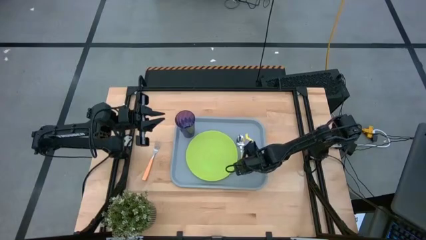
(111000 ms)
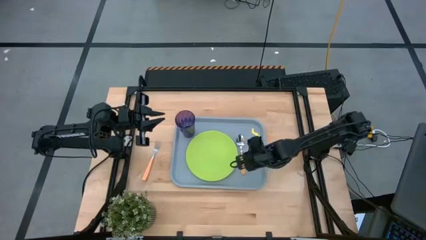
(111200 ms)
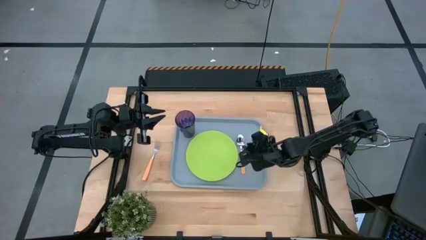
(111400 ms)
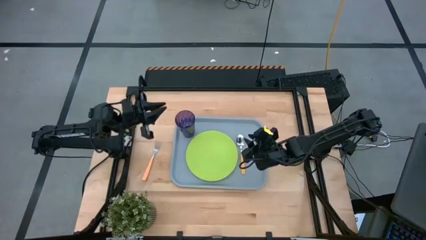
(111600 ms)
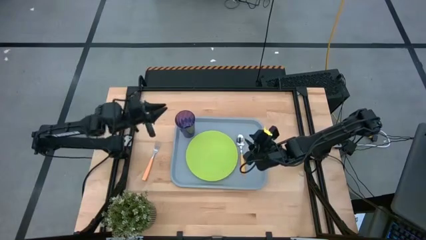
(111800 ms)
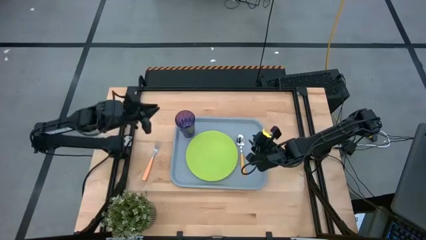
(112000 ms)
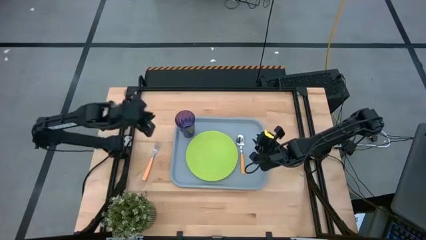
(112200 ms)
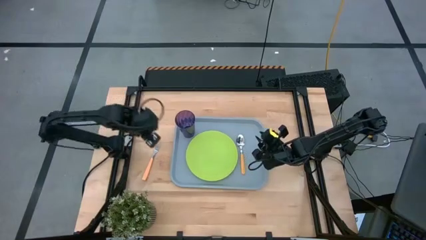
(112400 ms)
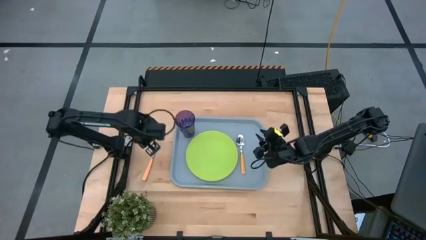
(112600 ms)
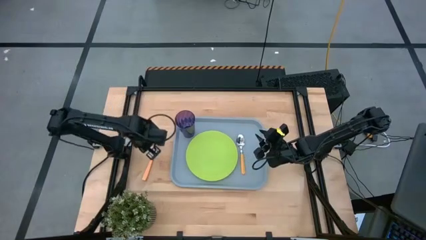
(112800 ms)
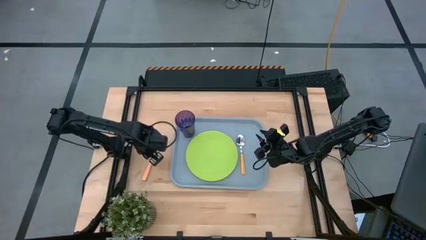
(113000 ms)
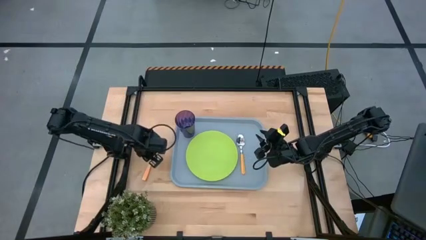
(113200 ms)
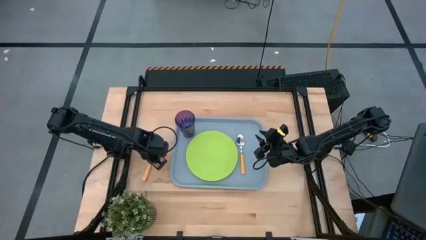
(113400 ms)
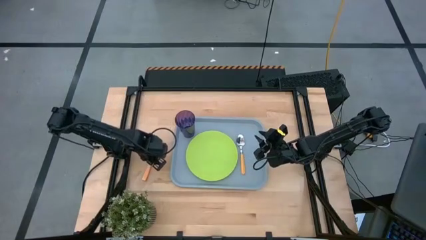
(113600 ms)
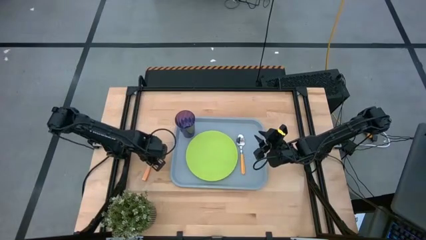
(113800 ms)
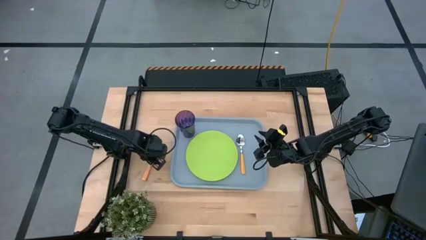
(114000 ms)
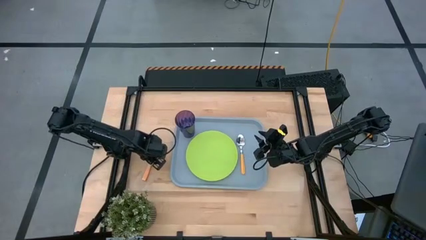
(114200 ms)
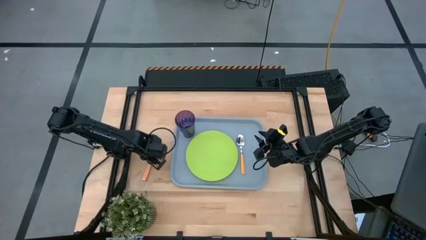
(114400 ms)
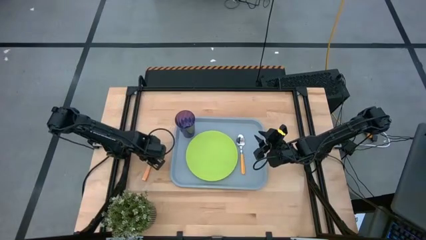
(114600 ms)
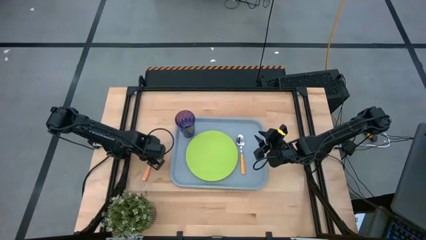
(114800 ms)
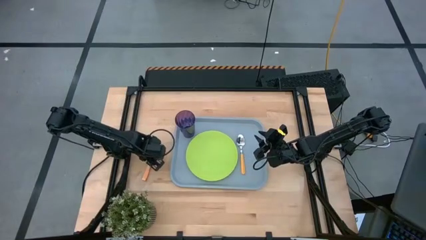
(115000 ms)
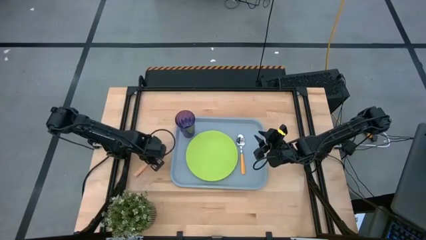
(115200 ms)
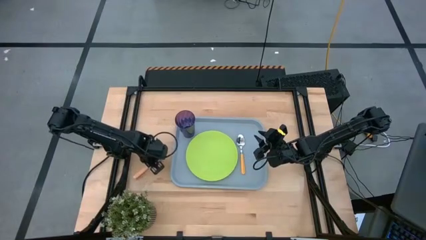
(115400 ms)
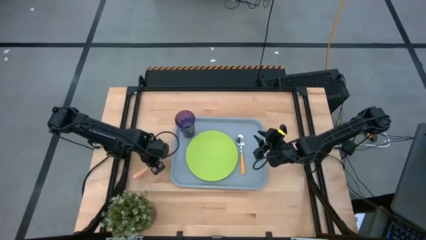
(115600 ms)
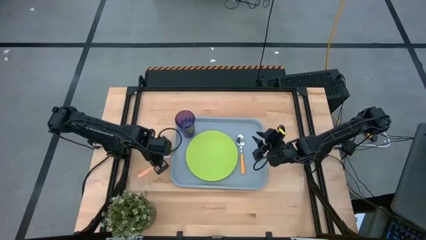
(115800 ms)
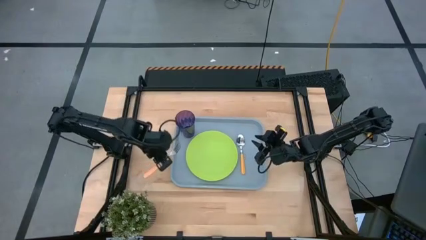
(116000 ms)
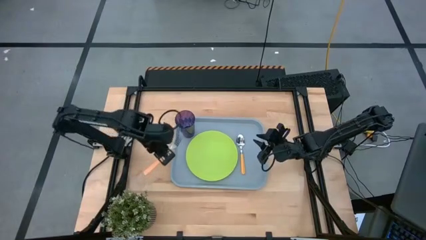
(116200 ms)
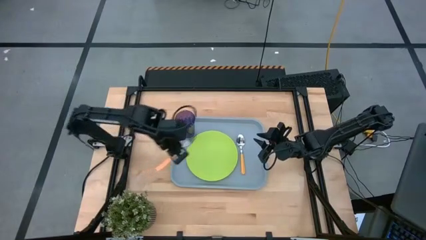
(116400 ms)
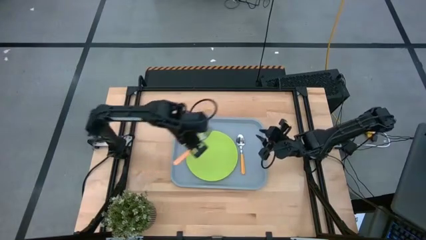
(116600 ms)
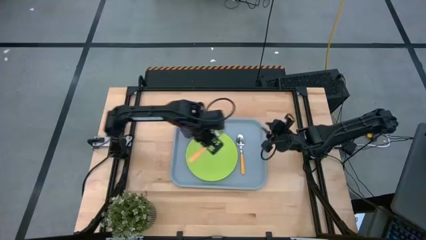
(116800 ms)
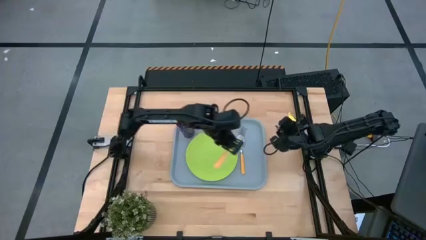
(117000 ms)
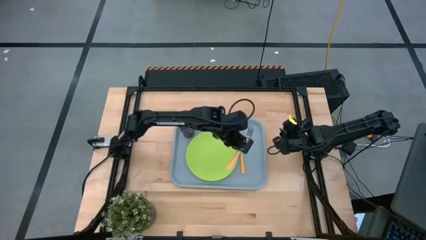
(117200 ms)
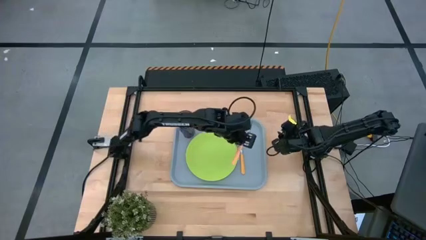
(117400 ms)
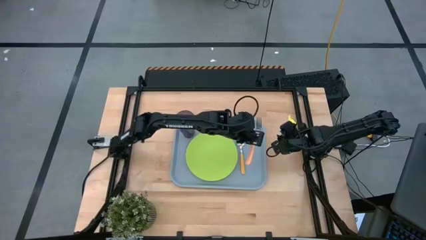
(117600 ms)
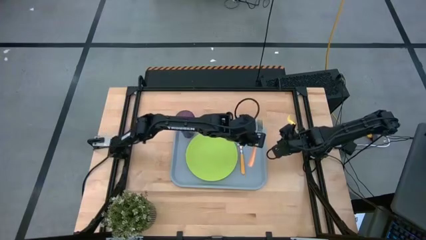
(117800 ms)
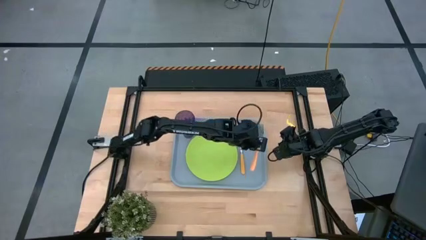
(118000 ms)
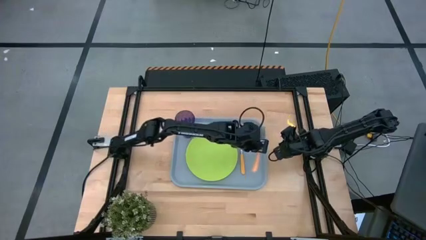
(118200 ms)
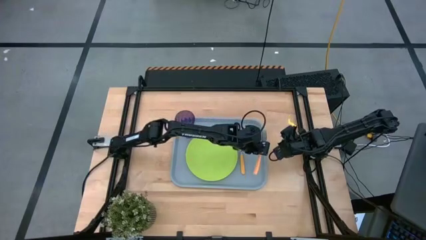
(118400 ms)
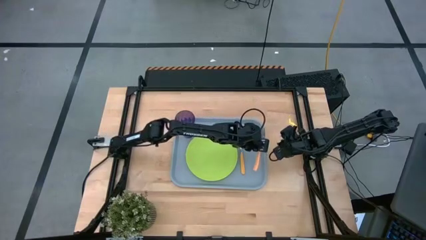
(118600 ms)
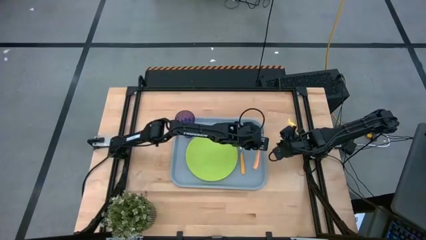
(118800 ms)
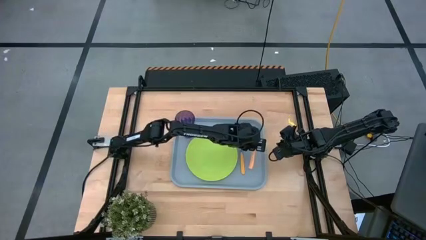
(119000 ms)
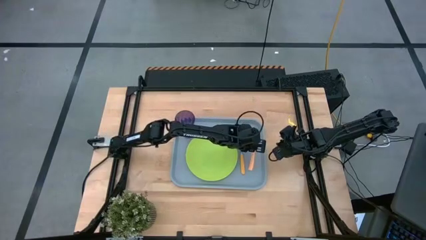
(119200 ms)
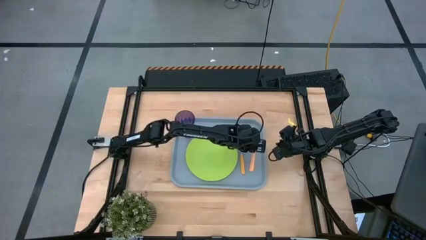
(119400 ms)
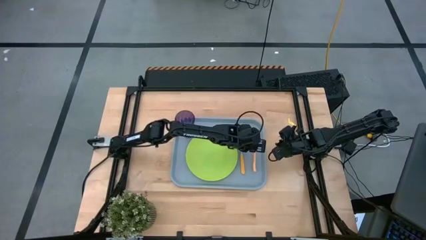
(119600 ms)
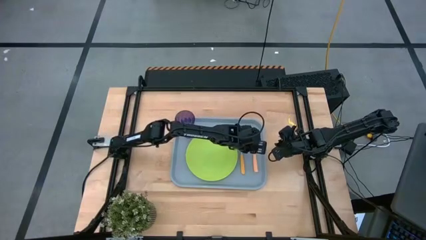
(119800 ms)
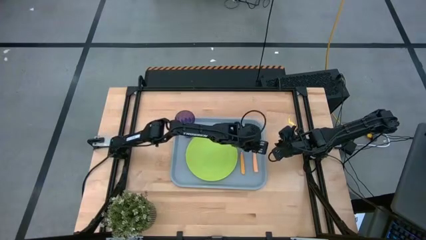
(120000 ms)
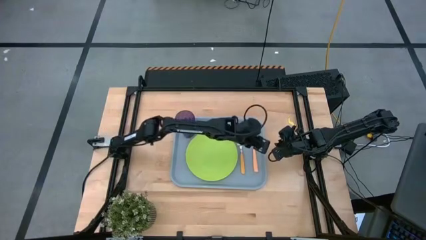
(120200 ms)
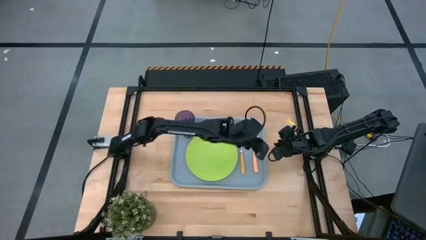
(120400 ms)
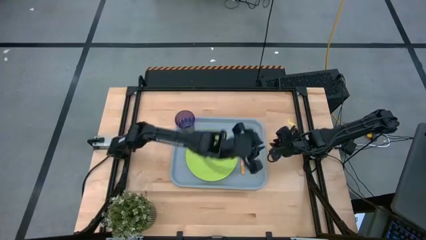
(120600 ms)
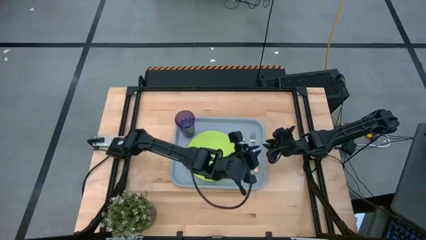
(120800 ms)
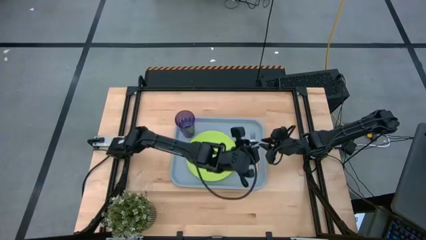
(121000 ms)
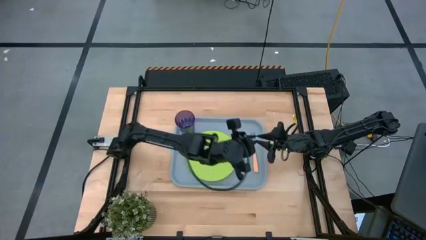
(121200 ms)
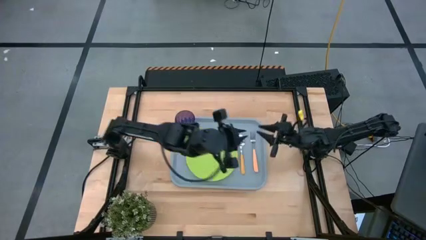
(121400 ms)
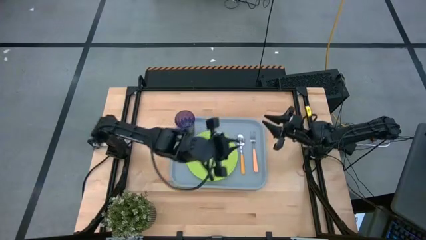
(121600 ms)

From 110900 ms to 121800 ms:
Task: Pick and place plate/cup/fork/spoon on tray
Put the orange fork on the gray serving tray to the right side of the orange spoon

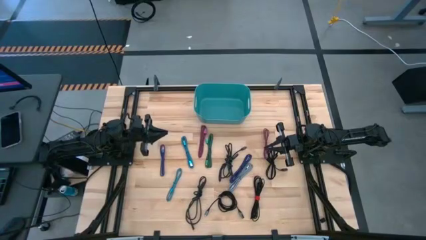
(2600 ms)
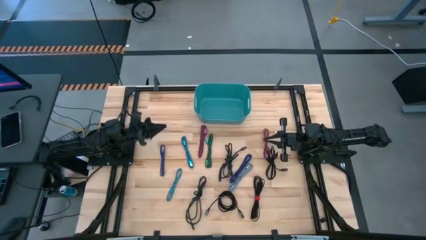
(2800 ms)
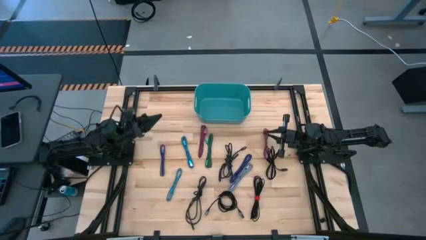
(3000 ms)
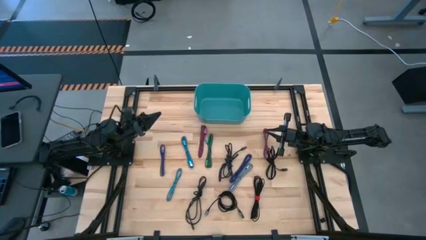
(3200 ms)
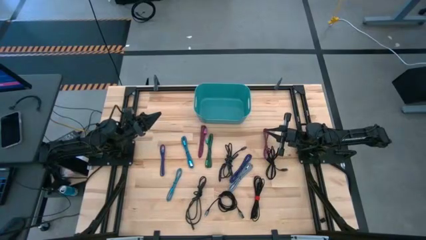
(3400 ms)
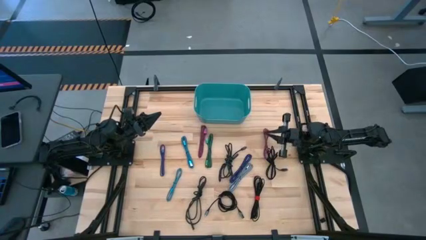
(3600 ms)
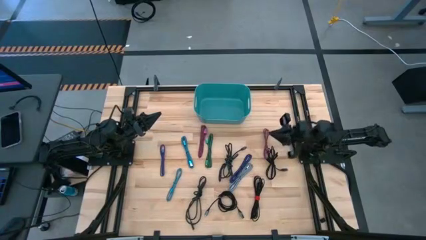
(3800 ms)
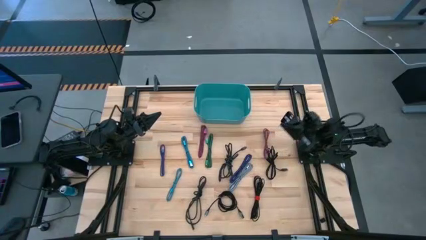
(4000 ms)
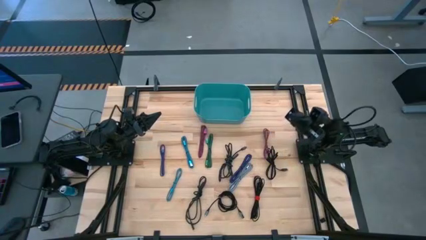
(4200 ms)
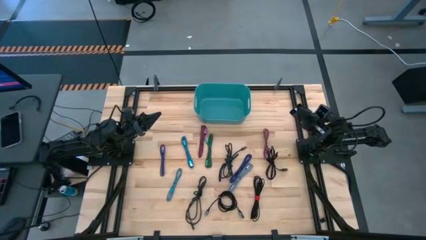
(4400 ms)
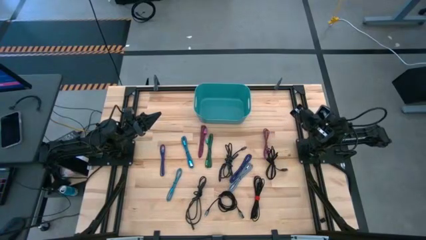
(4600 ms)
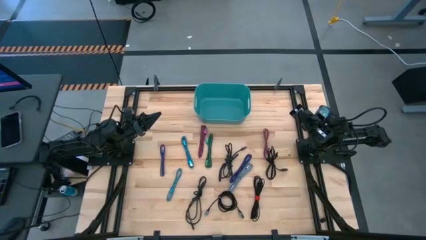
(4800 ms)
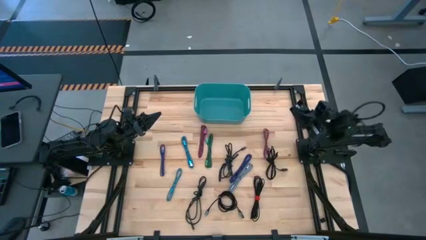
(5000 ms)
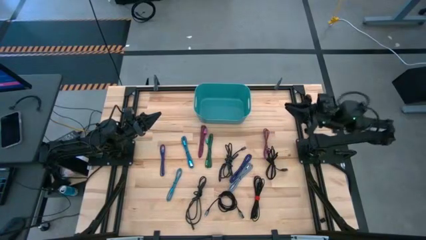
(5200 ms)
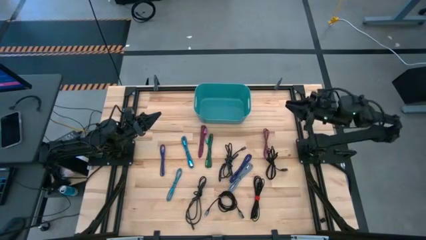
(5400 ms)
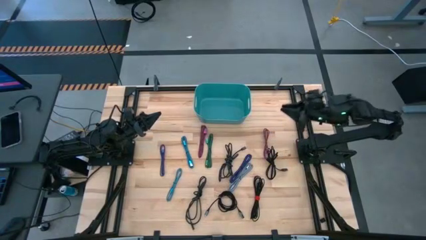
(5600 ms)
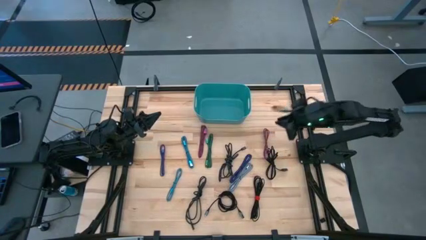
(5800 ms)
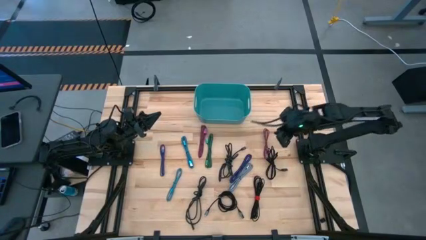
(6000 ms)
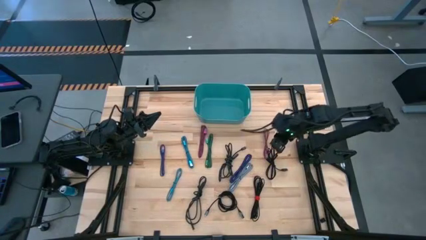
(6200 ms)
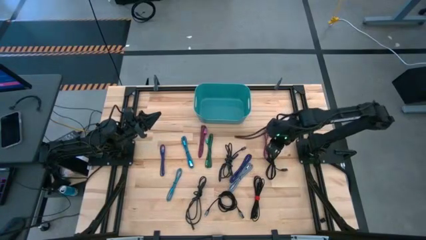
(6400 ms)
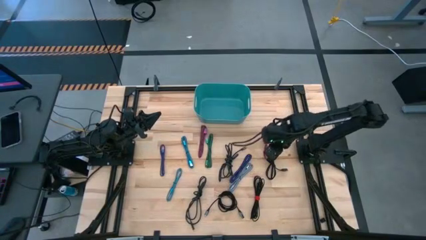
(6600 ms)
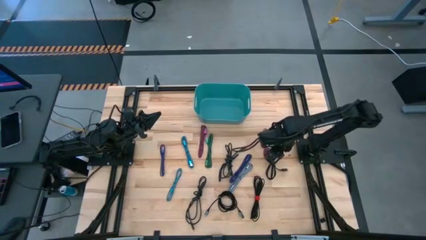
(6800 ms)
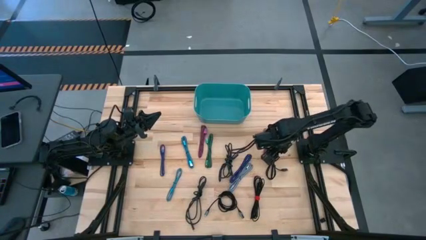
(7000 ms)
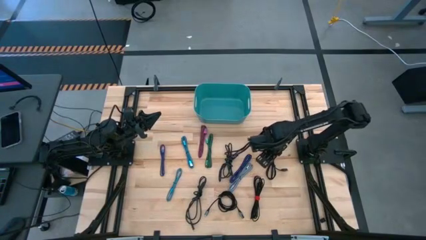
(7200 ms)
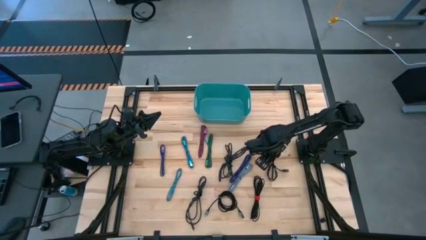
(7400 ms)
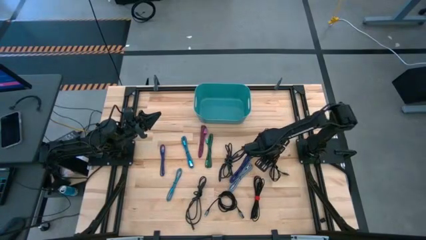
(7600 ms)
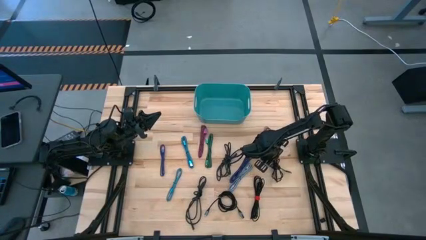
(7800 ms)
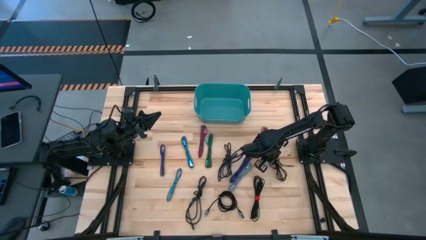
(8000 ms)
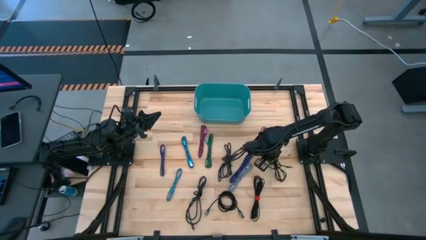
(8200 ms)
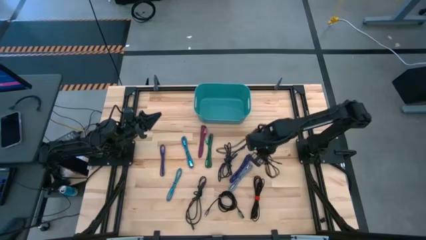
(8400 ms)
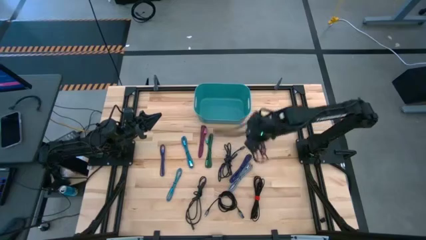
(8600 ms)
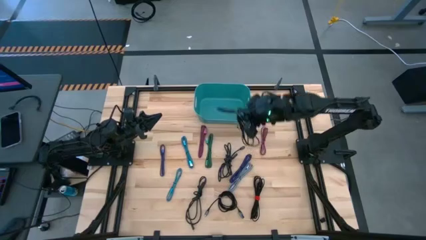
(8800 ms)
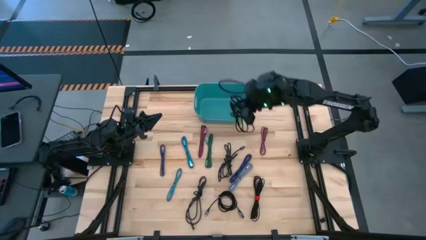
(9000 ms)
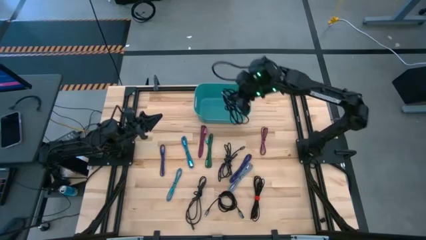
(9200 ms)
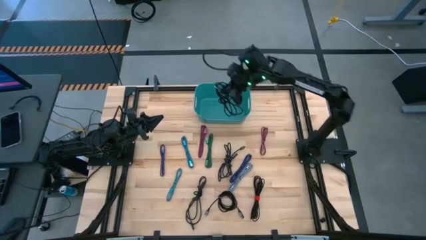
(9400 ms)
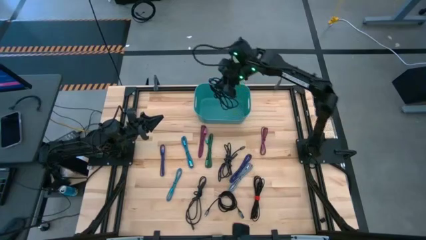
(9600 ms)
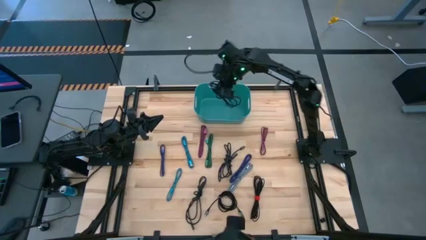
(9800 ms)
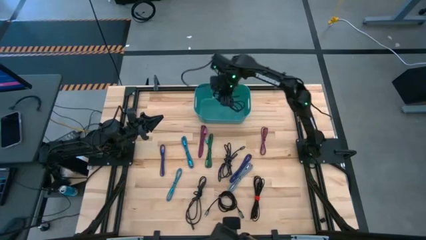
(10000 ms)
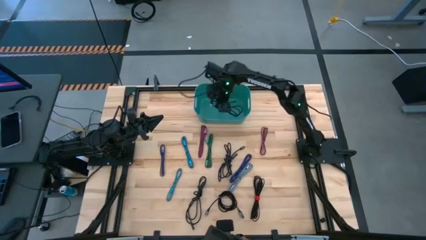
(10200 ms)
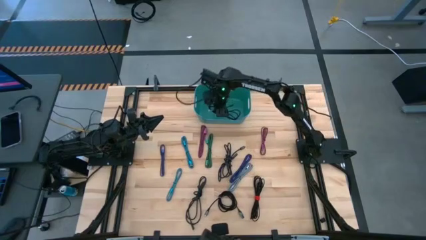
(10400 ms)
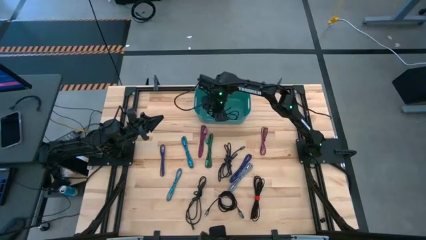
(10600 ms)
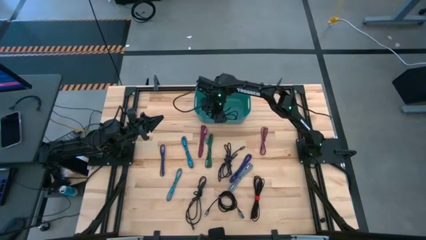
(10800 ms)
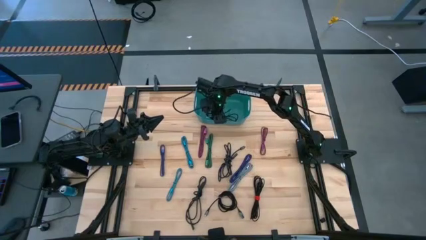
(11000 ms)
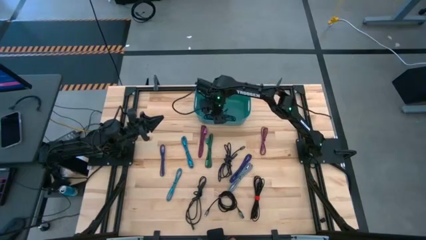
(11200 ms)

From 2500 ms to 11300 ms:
Task: Pick and place USB-C Cables
Put the black charger cable into the light blue bin
